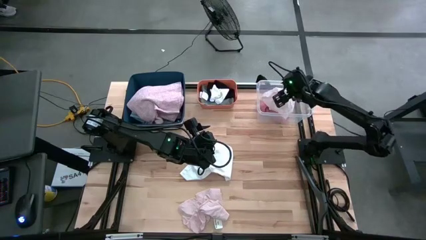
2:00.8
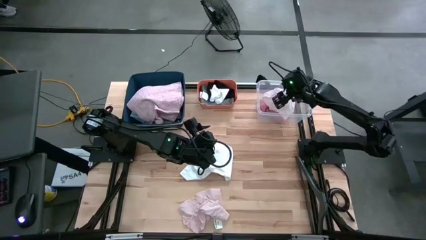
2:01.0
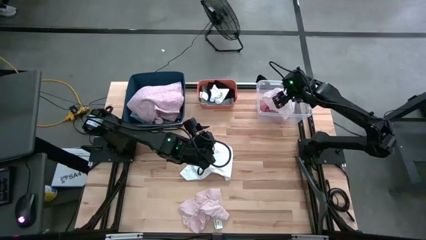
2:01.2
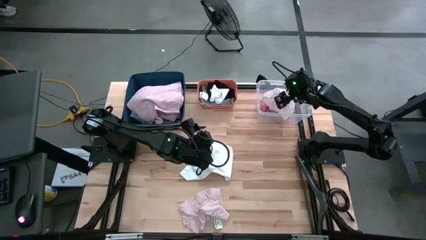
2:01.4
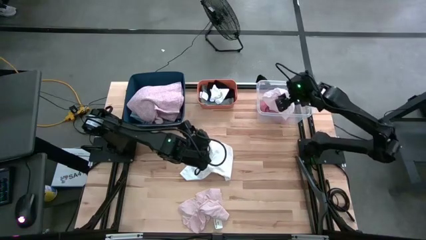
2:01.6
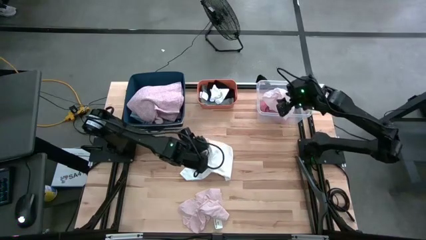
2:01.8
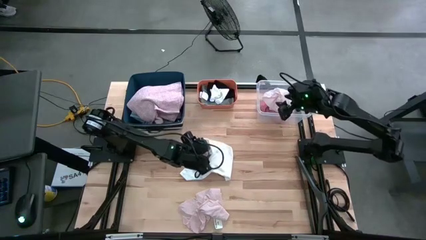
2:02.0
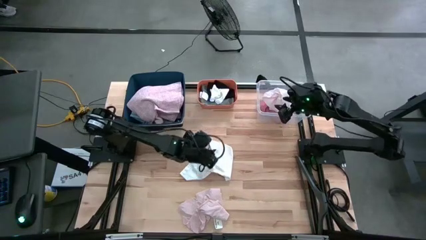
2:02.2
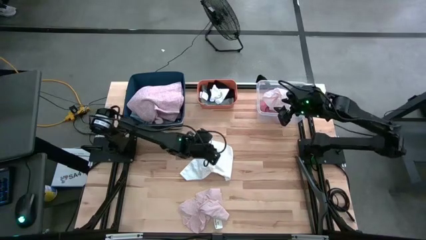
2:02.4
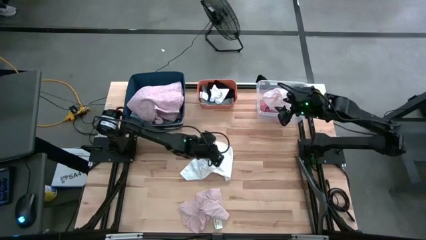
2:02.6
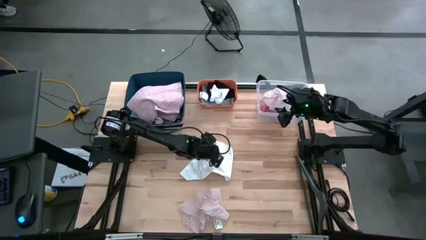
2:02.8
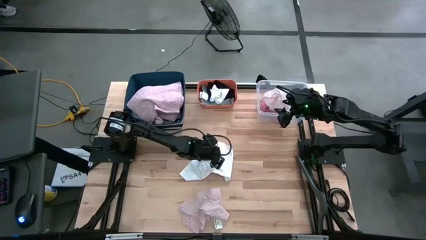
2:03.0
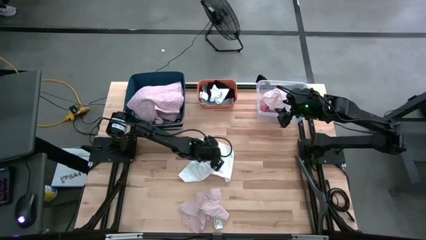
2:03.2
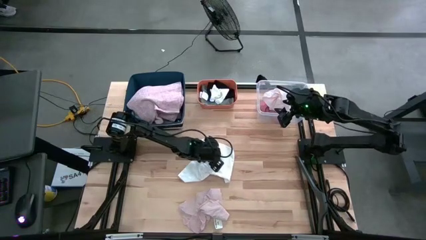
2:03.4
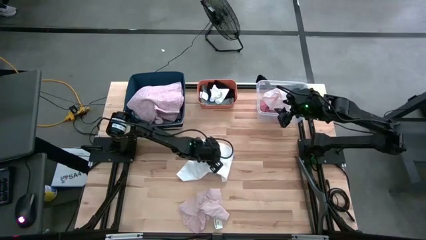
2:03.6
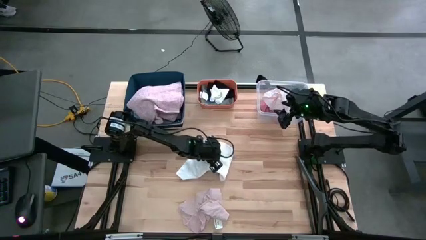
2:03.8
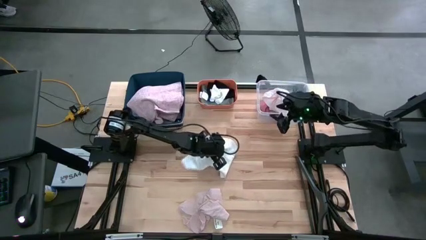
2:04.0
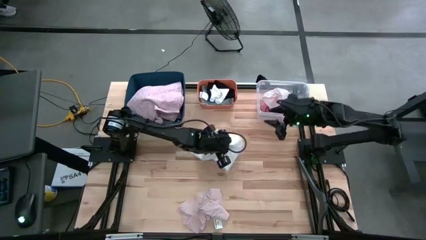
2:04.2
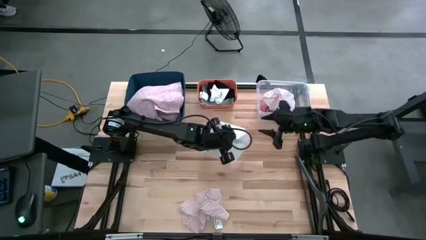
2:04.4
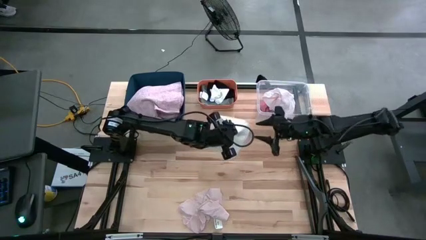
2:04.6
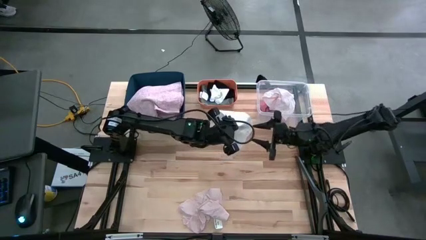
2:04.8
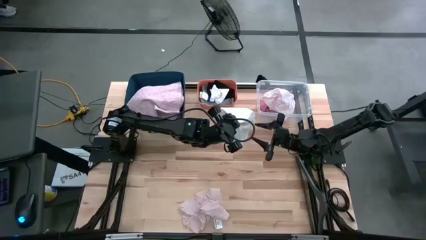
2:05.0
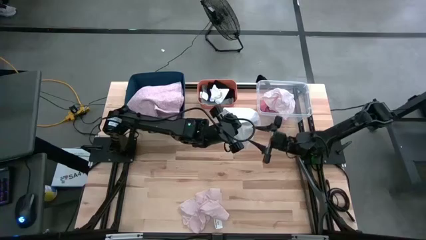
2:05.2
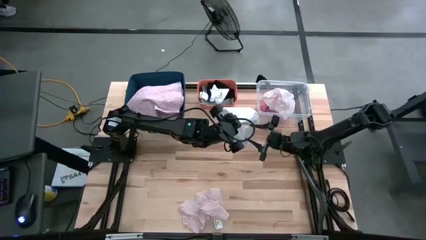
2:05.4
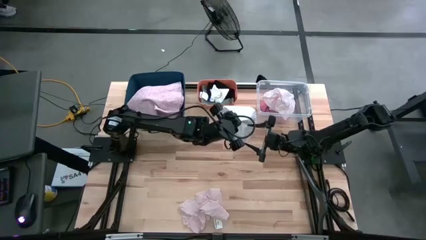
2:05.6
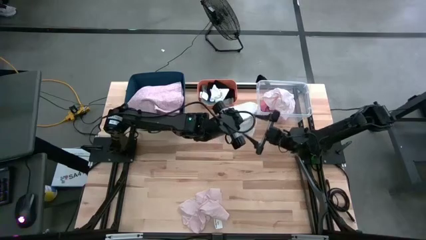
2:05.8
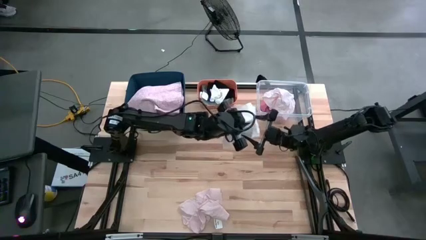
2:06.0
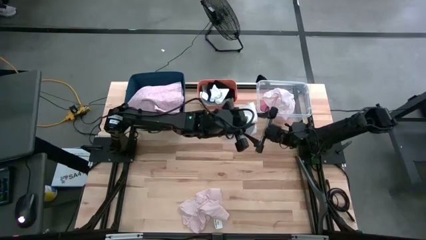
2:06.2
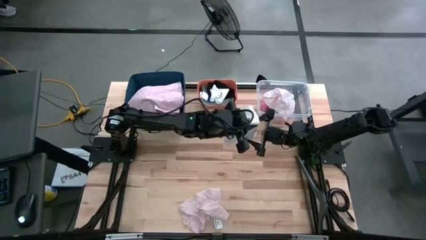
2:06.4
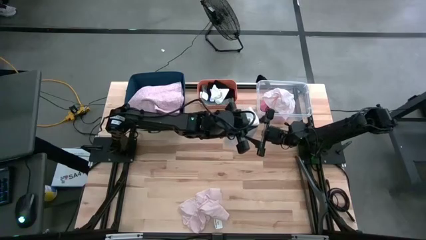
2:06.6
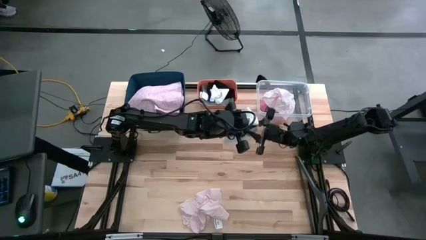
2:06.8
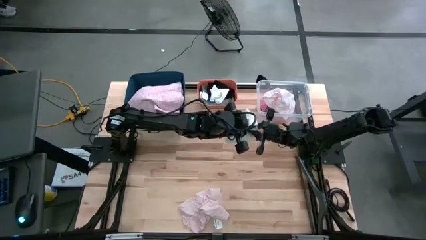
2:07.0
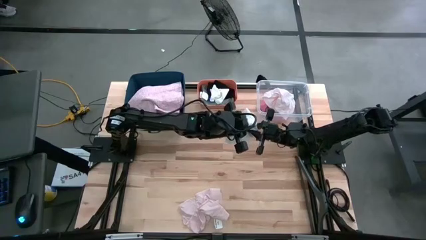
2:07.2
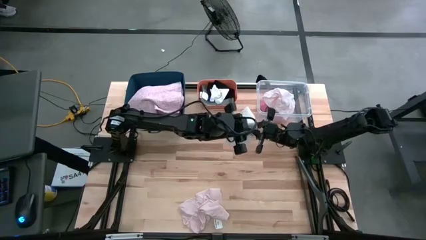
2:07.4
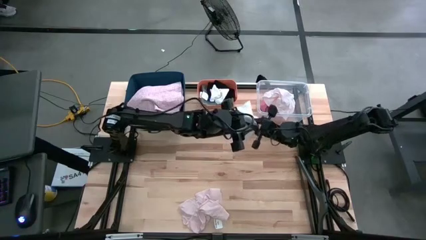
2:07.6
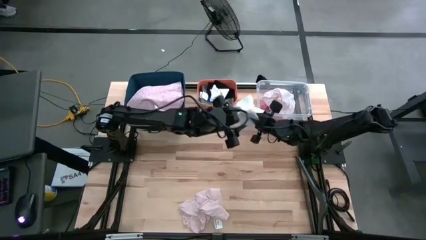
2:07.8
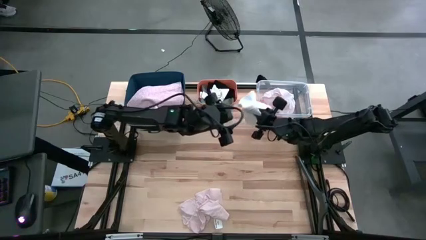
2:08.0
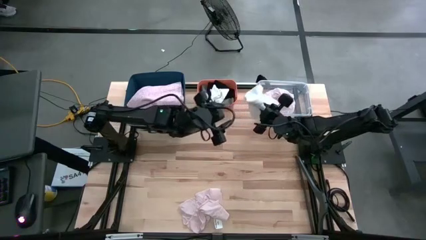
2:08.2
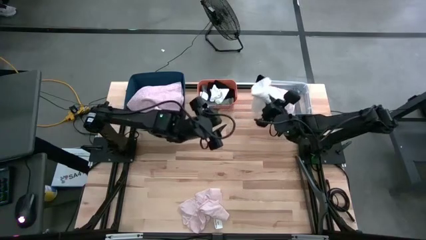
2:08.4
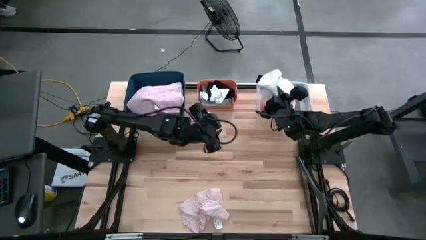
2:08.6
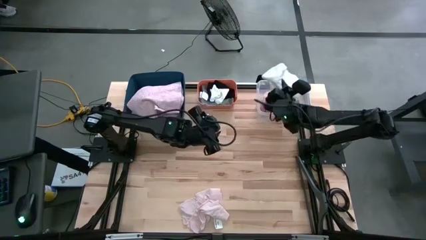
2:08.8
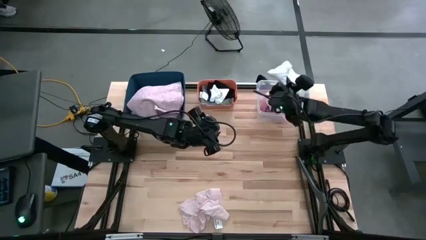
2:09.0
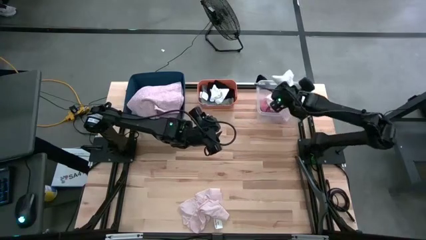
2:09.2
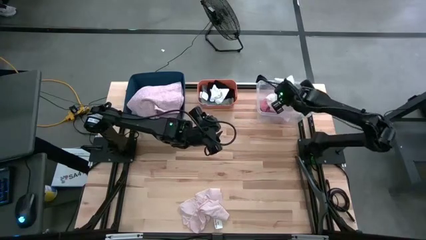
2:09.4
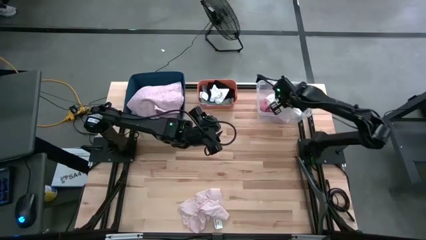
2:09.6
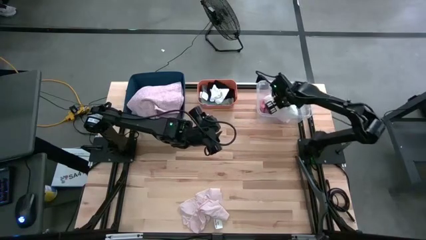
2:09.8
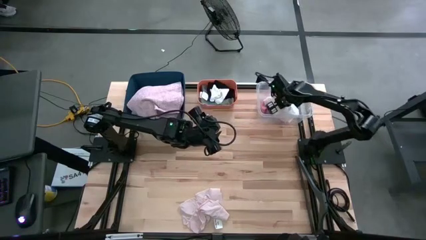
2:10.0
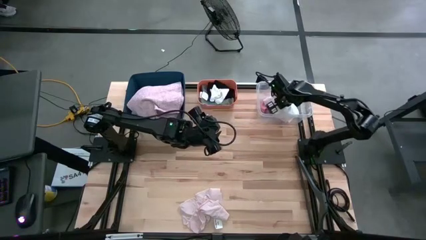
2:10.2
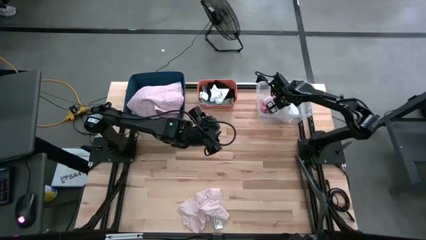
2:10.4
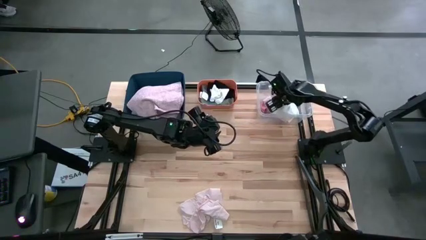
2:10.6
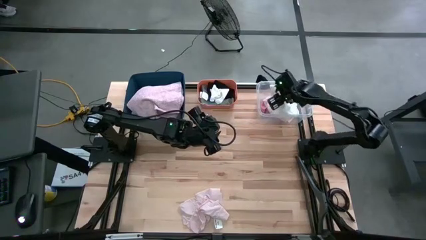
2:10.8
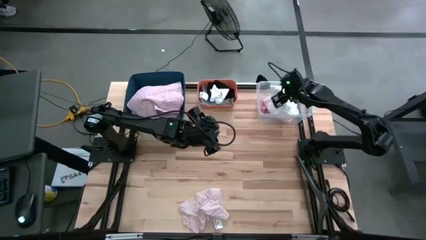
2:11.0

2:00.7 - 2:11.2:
Task: Pick & Place Cloths
Put the white underwear into the transparent bin
